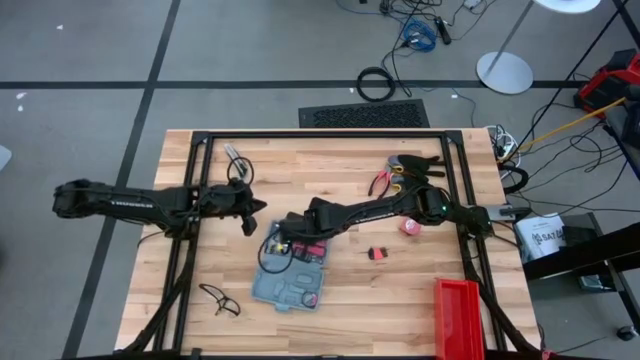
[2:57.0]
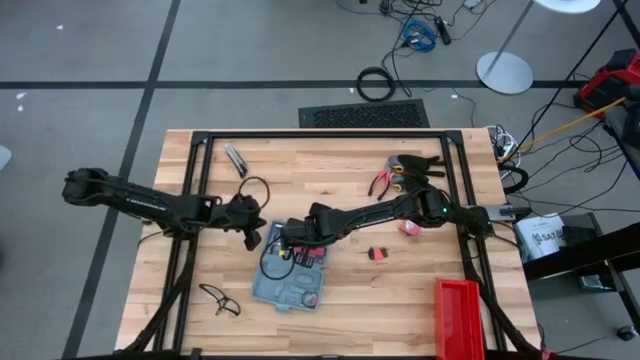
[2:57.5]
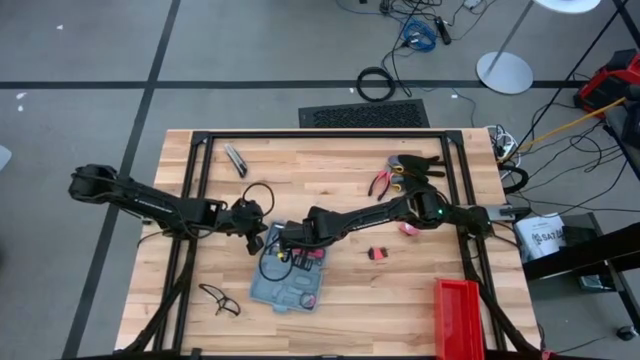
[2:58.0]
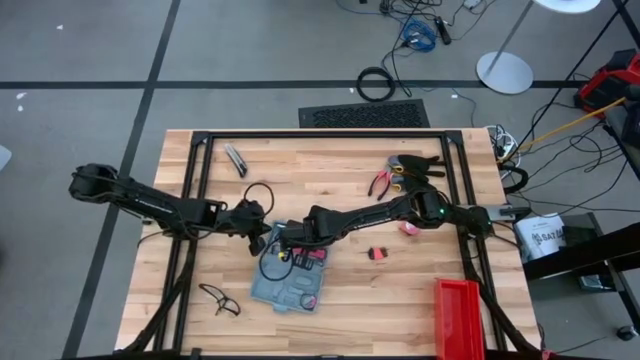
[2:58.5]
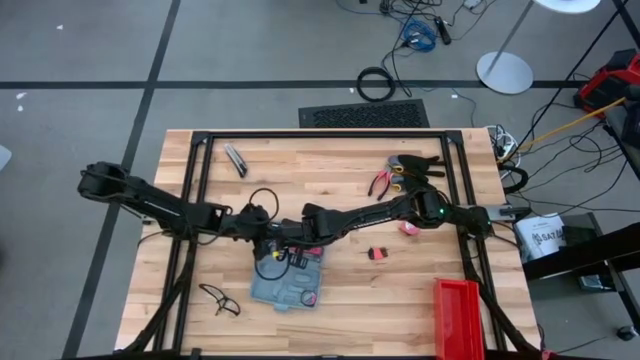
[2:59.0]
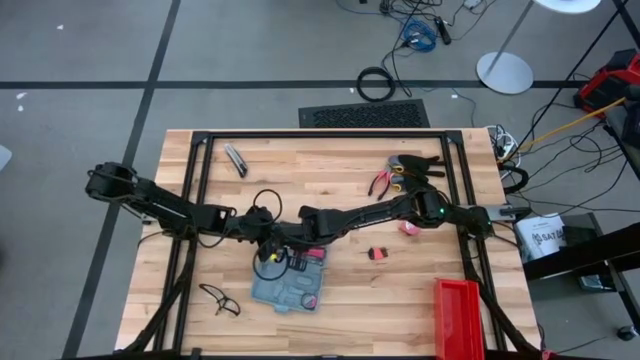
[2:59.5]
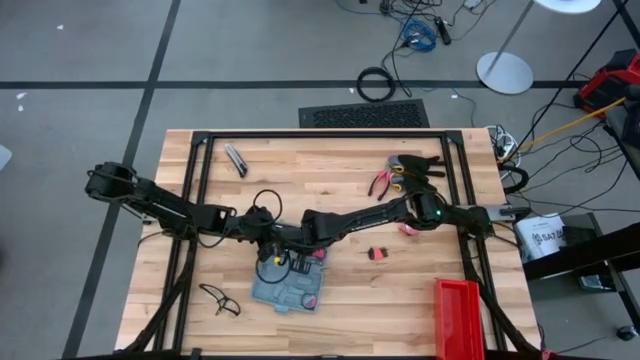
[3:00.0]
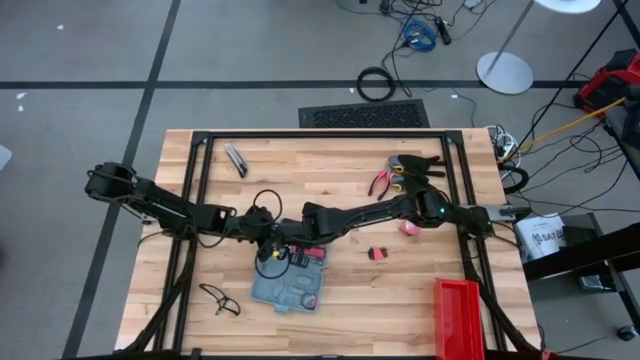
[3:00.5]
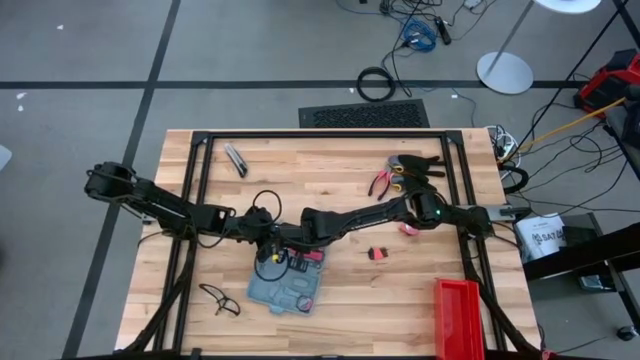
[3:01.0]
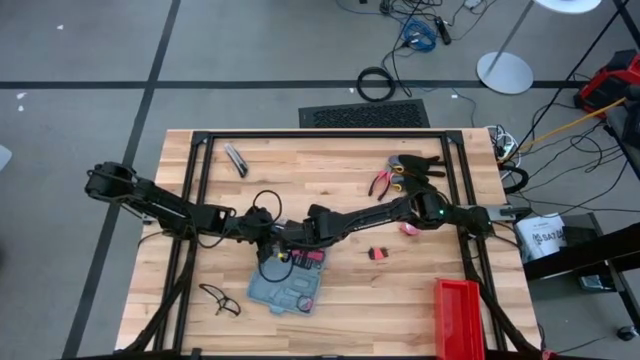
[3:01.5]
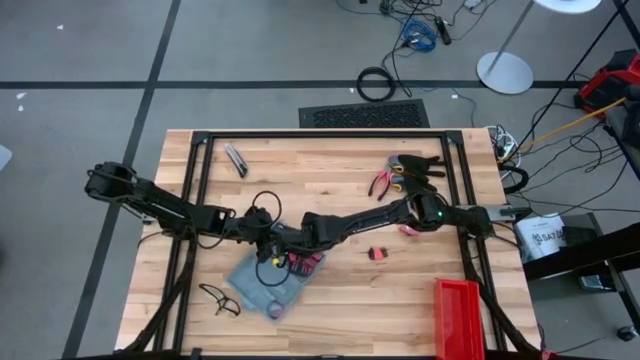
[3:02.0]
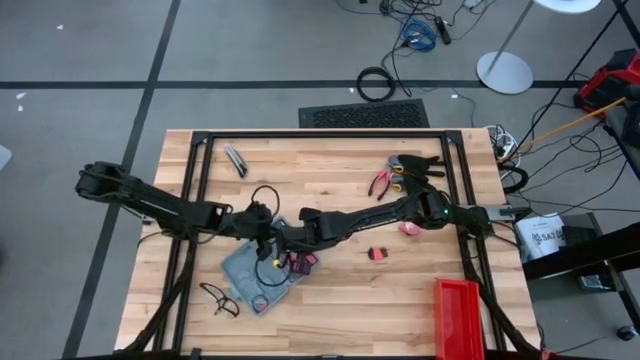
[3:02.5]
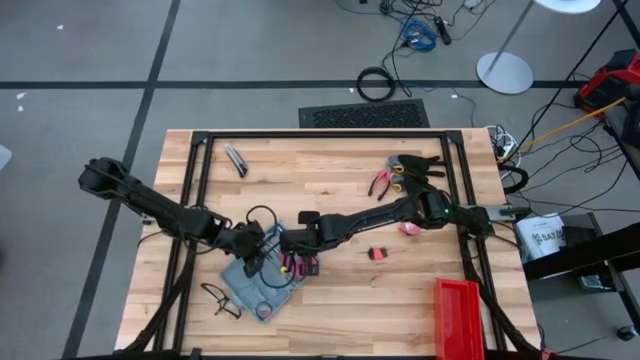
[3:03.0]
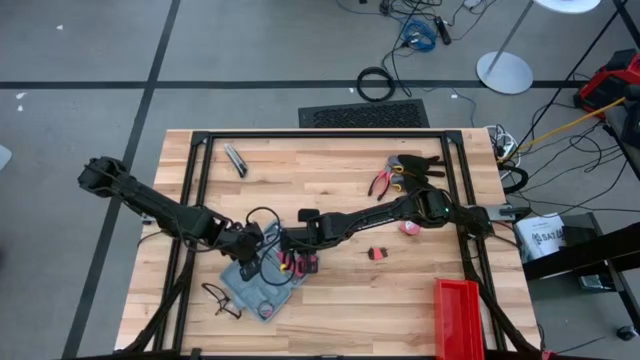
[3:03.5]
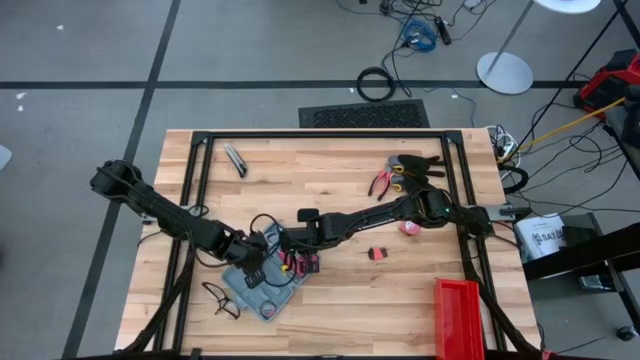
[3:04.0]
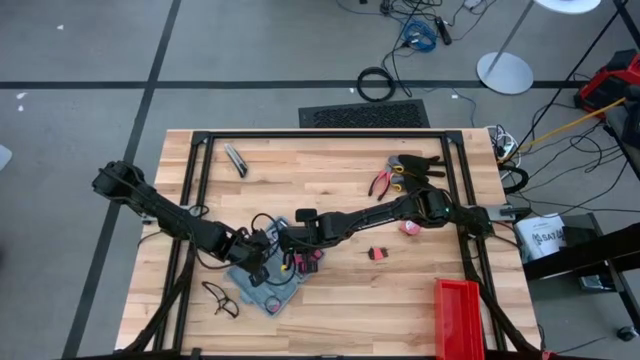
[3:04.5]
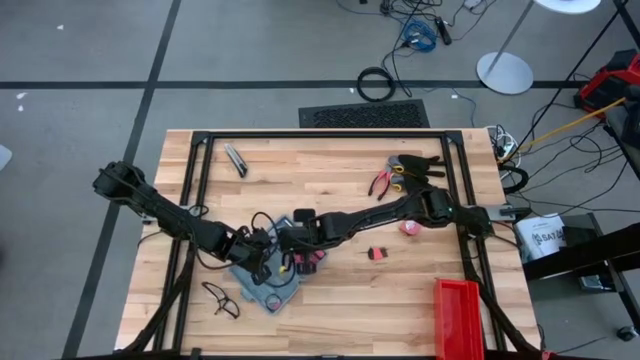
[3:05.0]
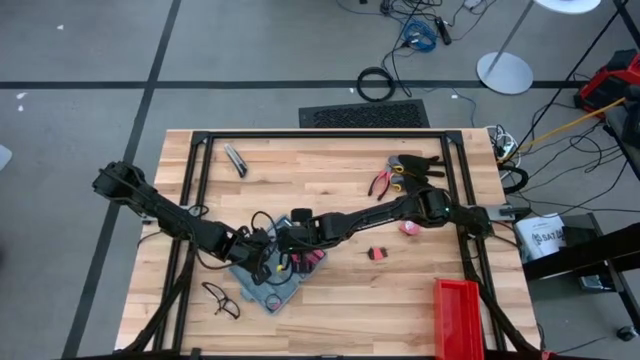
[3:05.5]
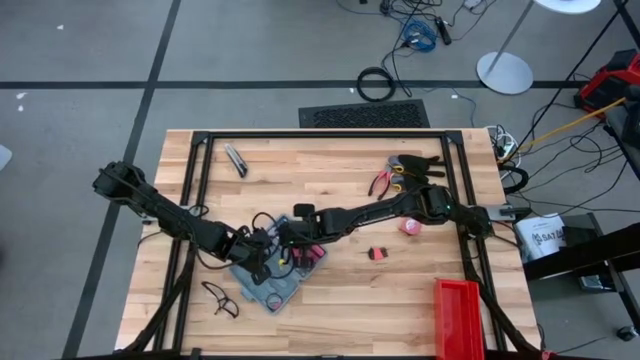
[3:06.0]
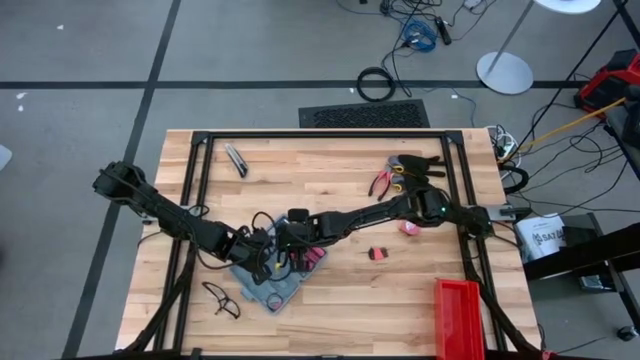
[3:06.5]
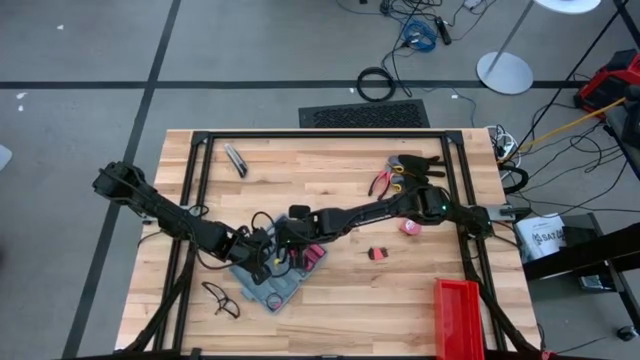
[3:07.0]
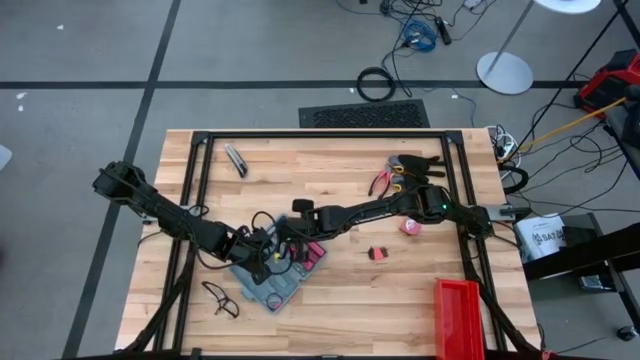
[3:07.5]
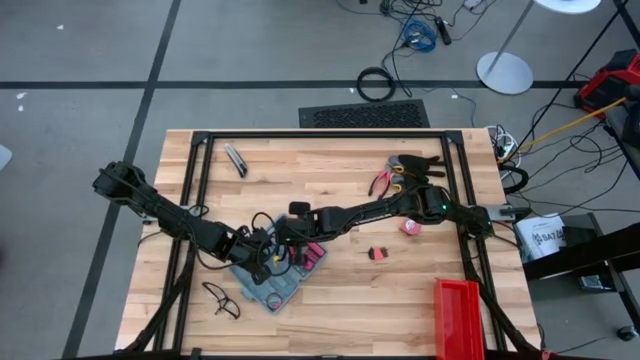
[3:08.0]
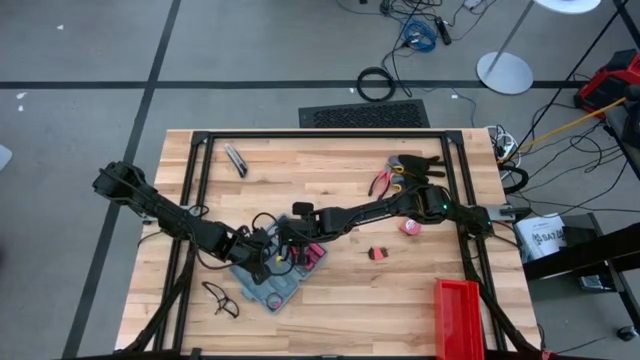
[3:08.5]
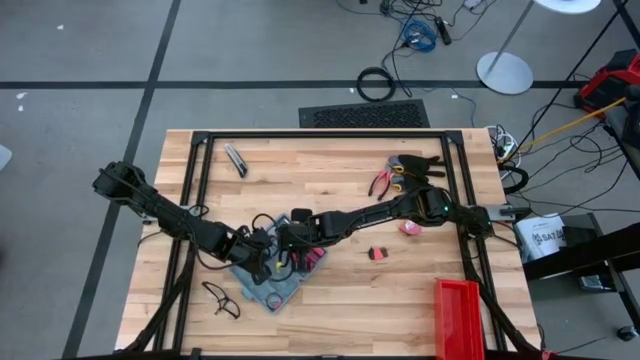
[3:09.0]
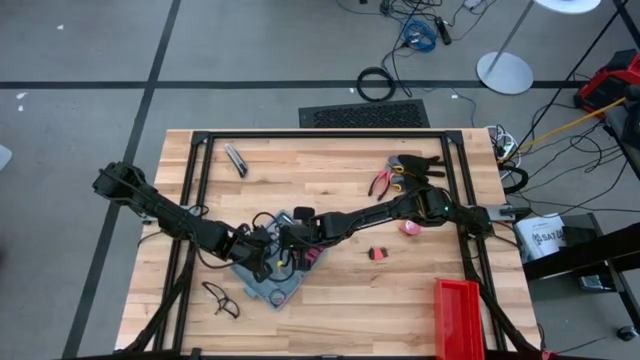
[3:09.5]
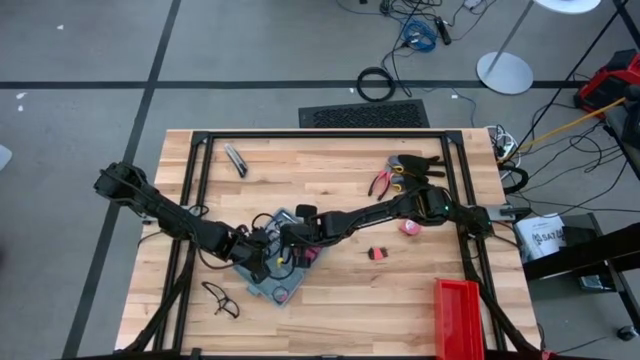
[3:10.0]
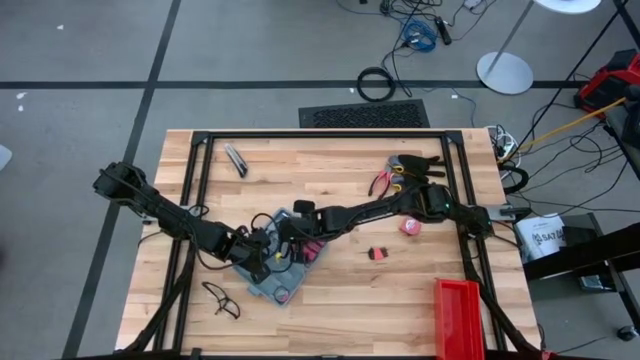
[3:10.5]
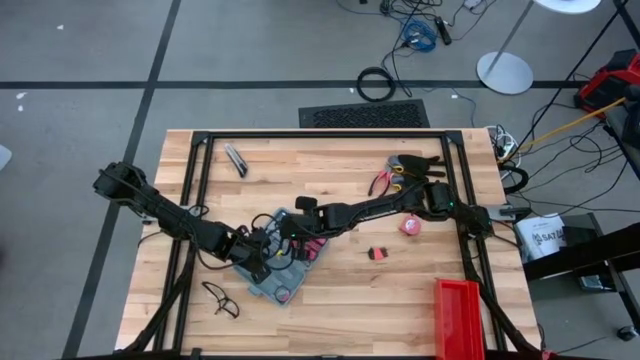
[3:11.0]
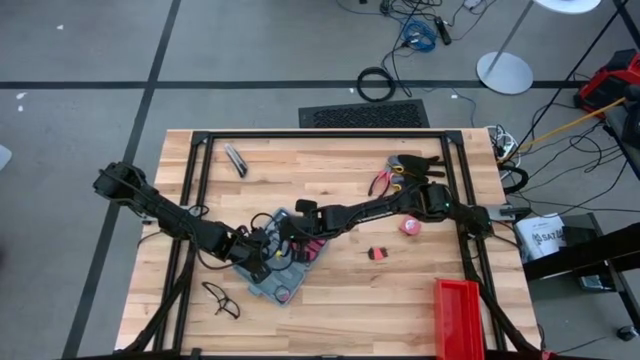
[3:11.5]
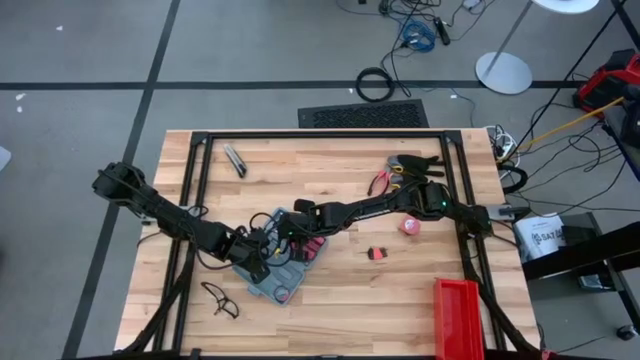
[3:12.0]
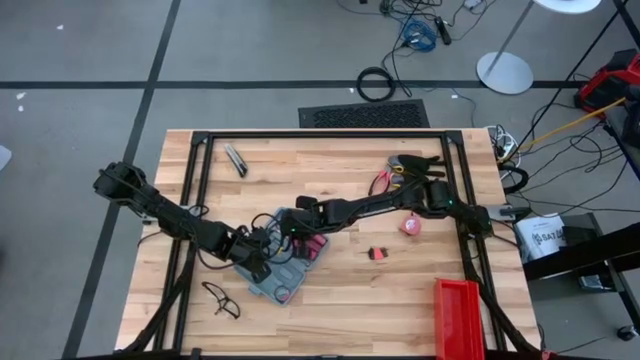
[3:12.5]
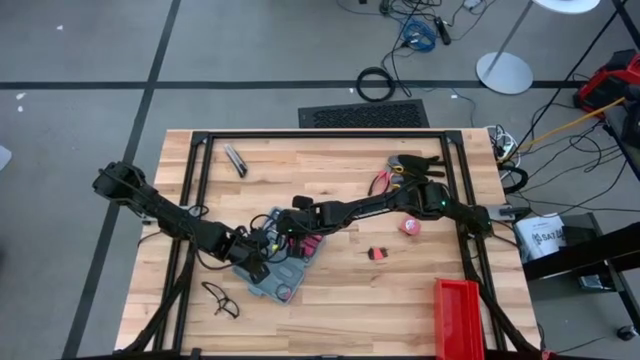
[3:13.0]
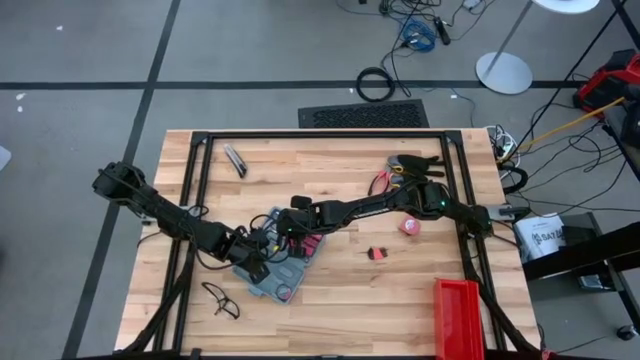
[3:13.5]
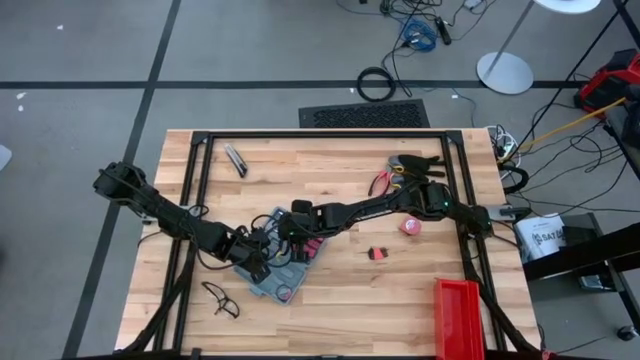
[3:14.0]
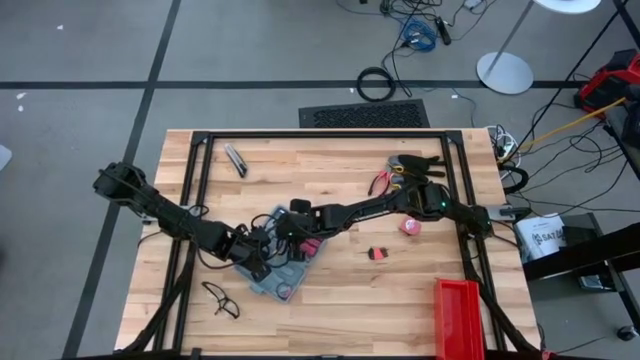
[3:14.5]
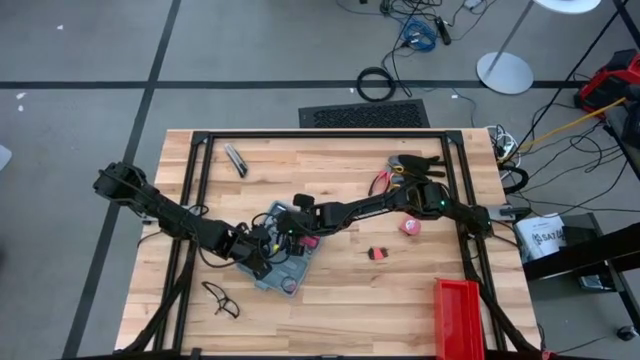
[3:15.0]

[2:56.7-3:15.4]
Task: prefit tool cases
Put the pink terminal block into the gray prefit tool case

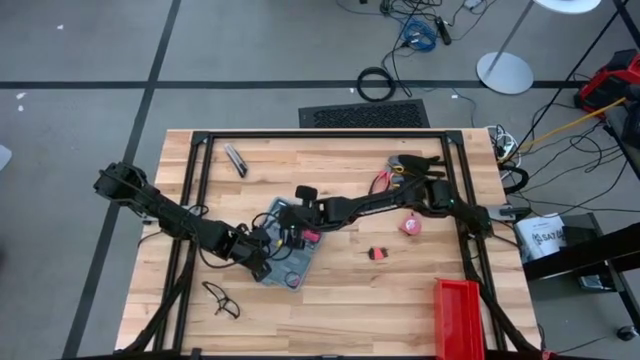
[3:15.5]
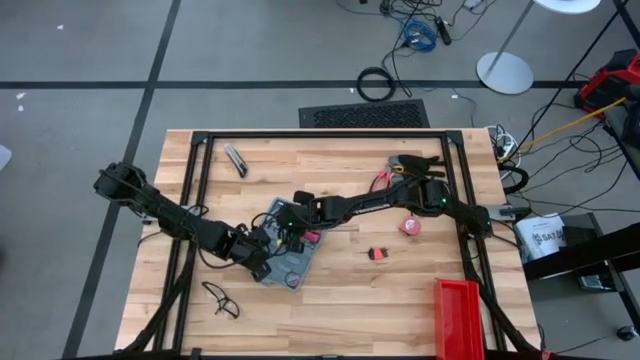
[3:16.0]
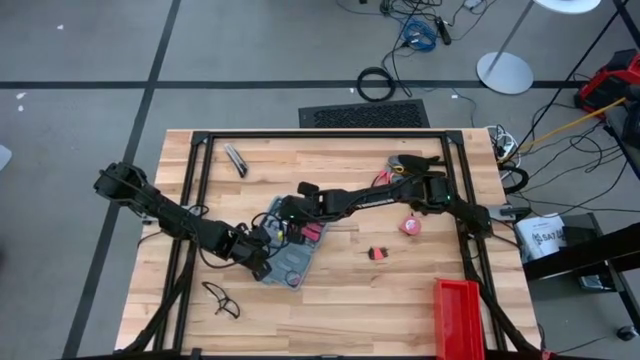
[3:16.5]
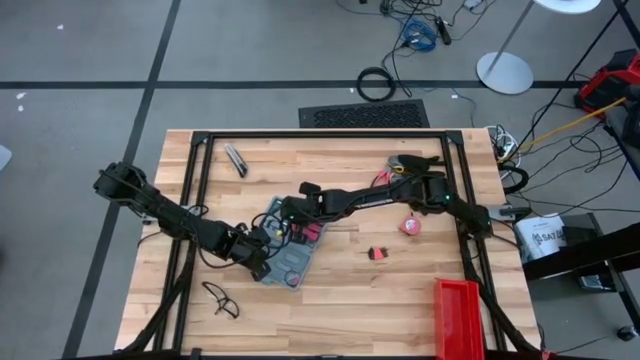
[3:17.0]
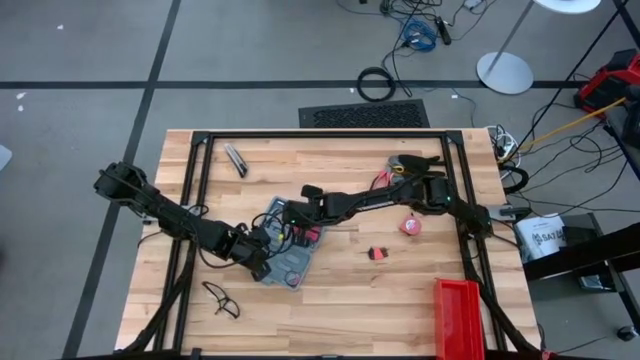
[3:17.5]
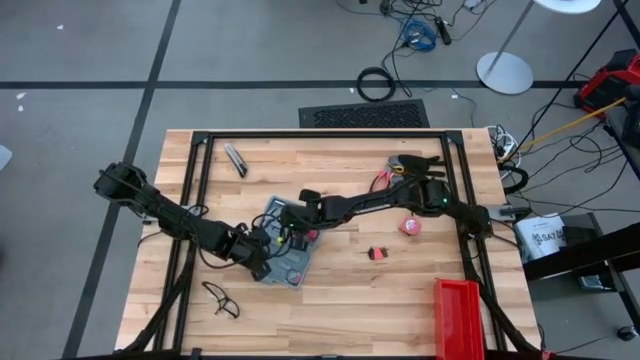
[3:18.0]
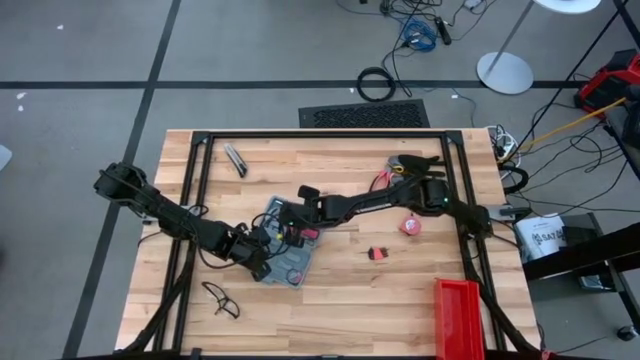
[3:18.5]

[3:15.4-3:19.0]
Put the pink terminal block into the gray prefit tool case
